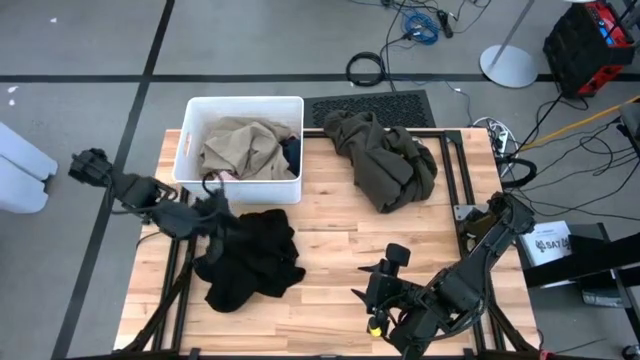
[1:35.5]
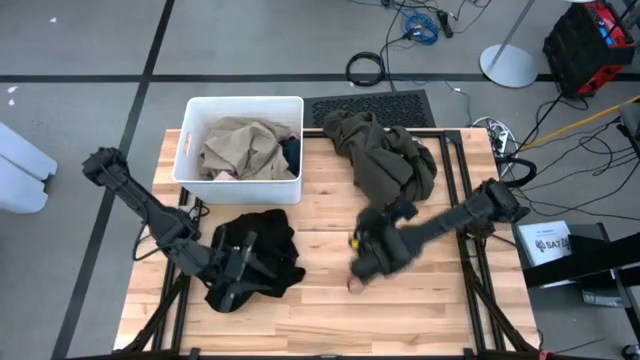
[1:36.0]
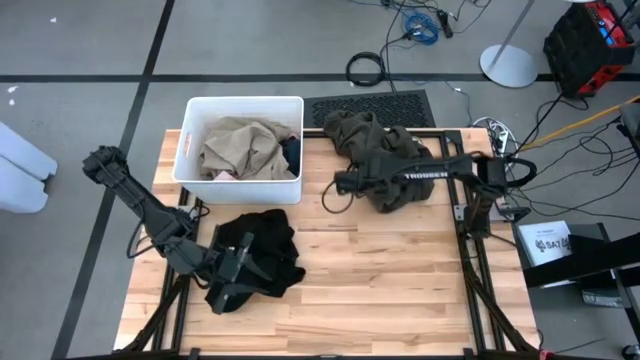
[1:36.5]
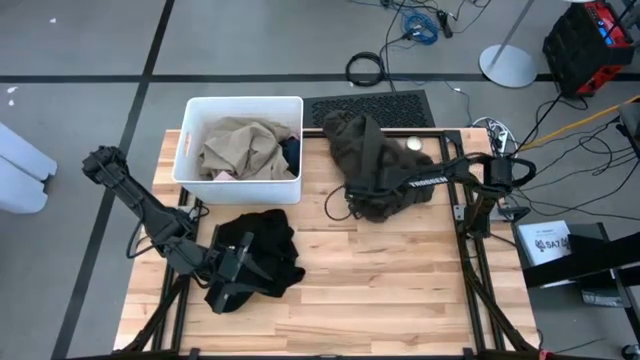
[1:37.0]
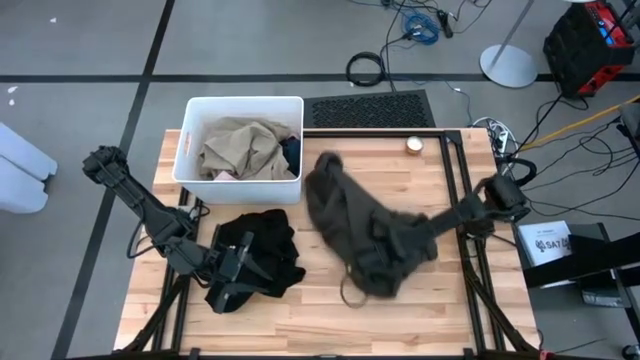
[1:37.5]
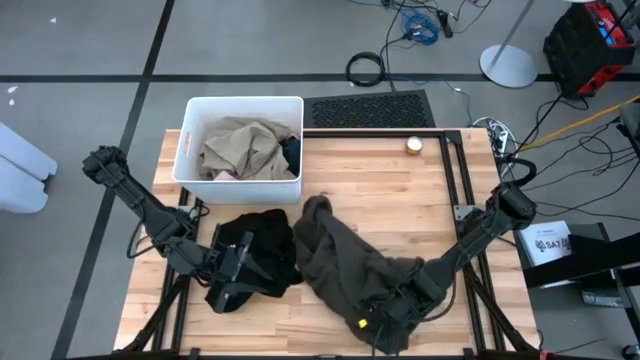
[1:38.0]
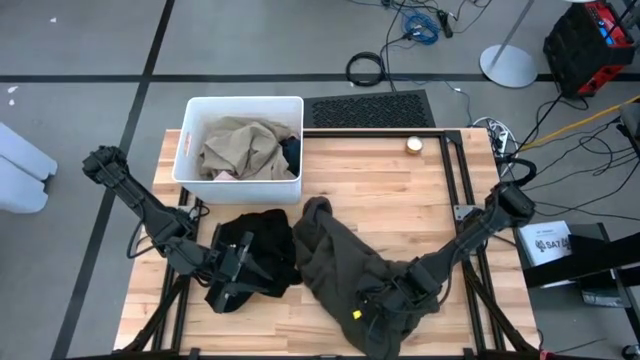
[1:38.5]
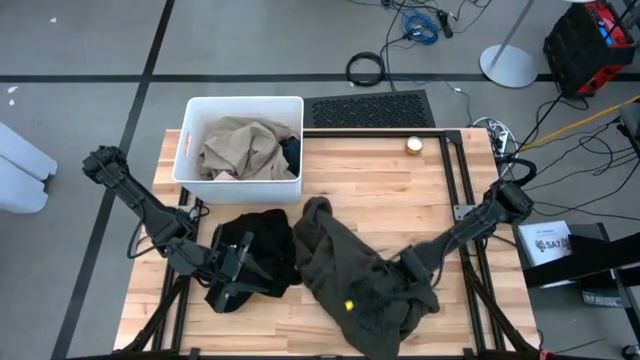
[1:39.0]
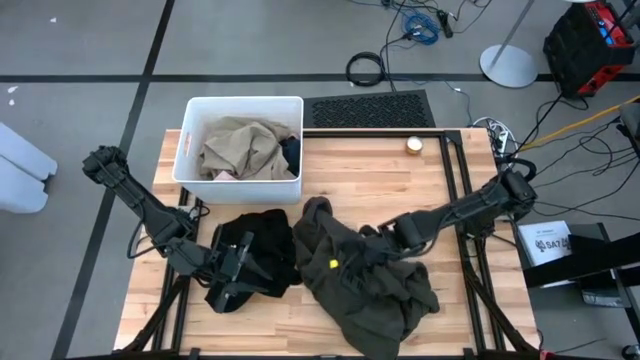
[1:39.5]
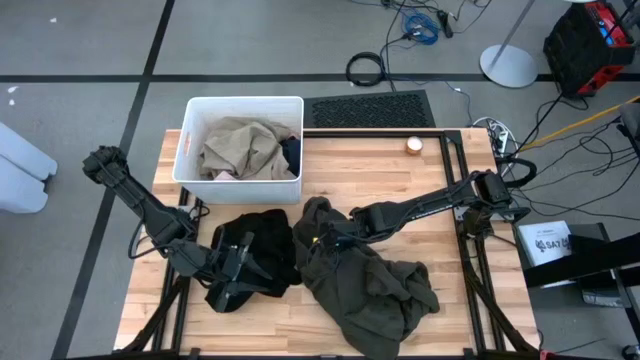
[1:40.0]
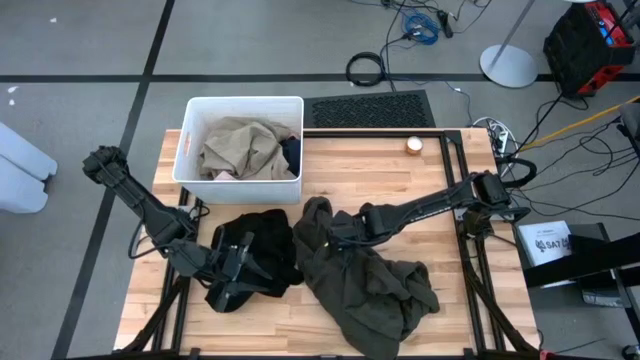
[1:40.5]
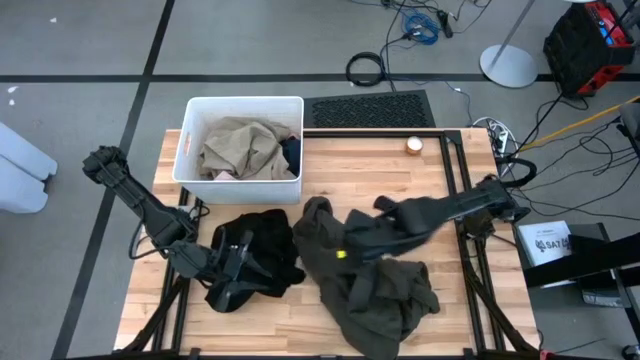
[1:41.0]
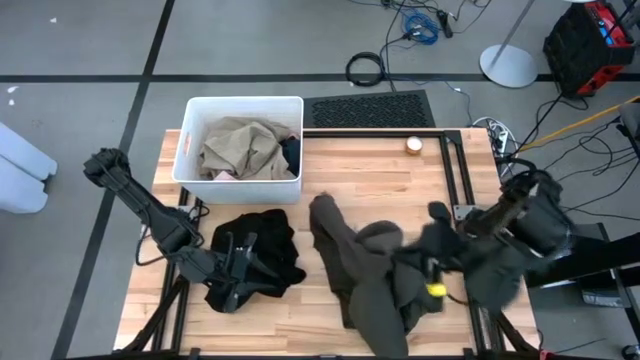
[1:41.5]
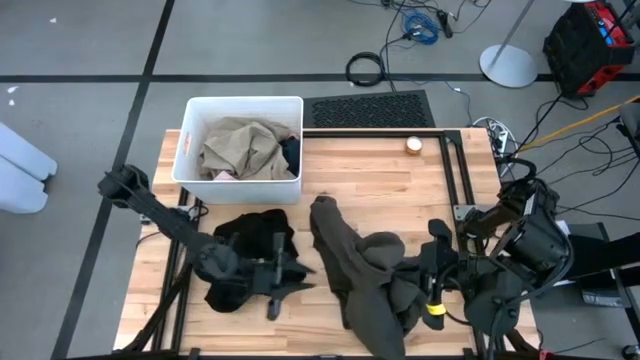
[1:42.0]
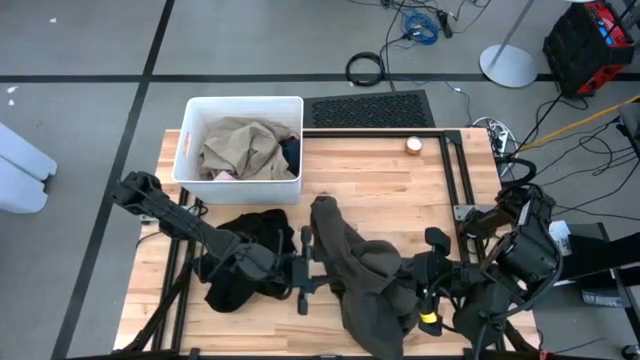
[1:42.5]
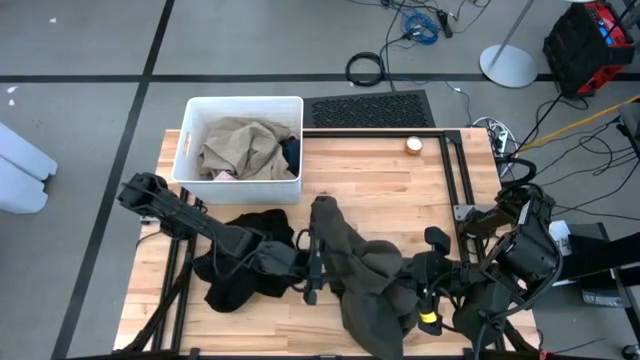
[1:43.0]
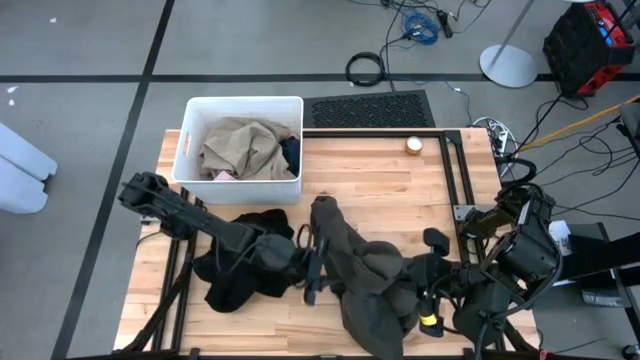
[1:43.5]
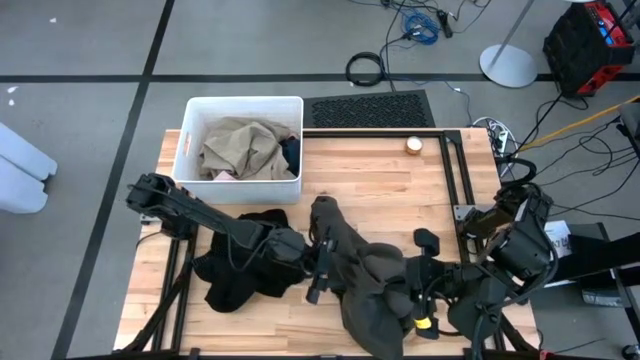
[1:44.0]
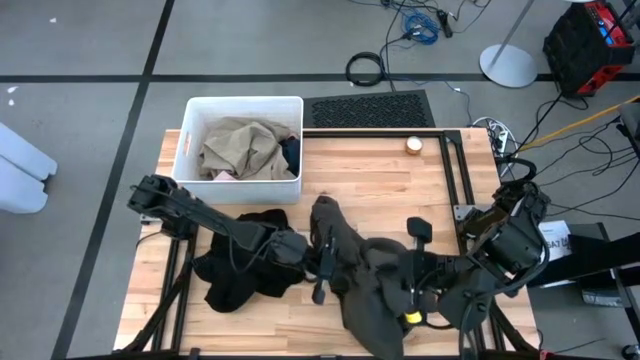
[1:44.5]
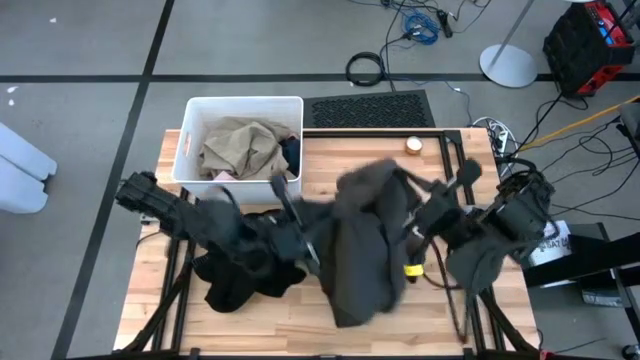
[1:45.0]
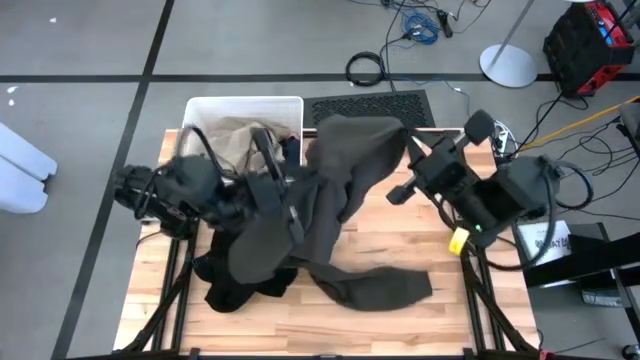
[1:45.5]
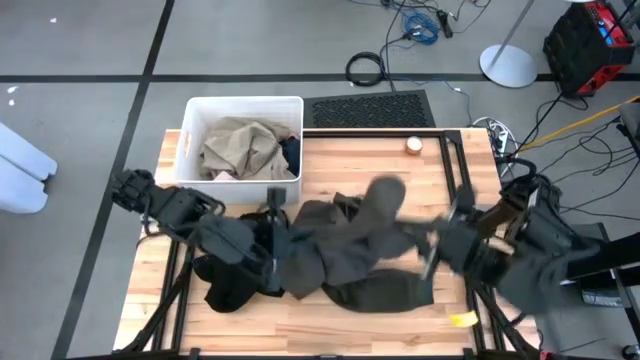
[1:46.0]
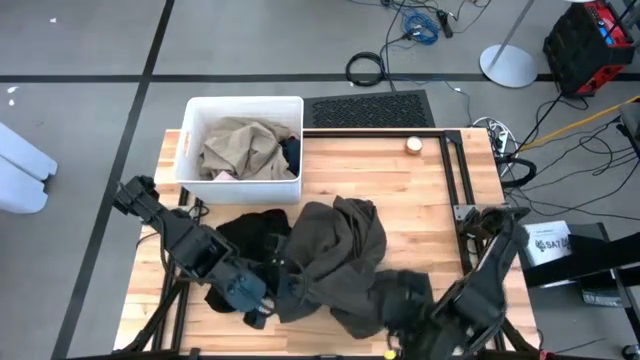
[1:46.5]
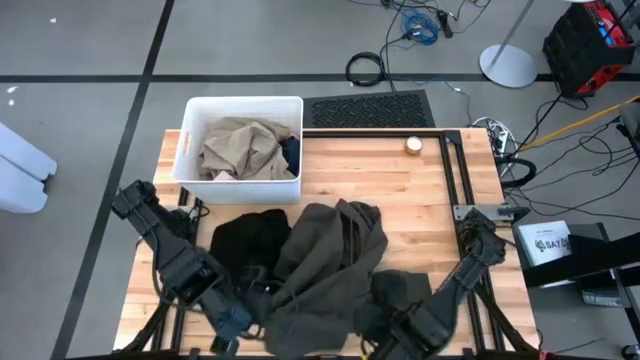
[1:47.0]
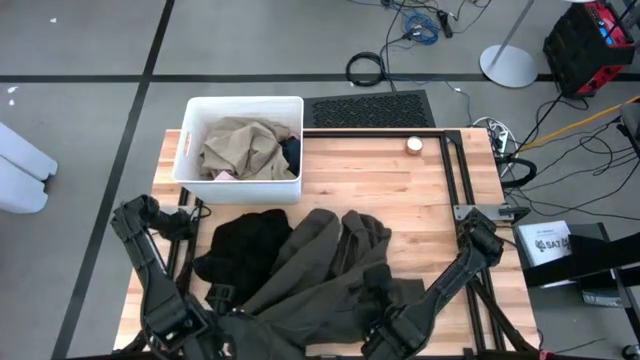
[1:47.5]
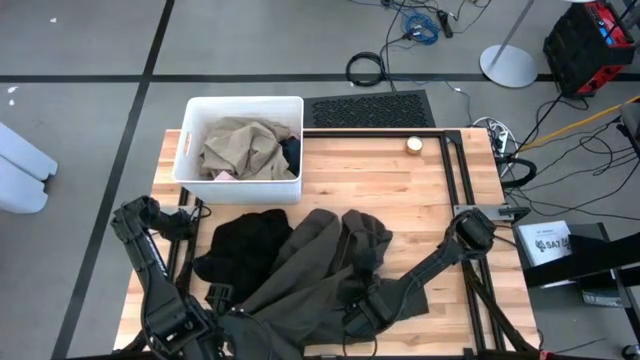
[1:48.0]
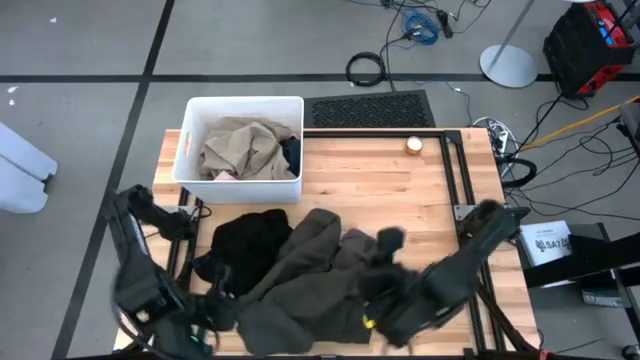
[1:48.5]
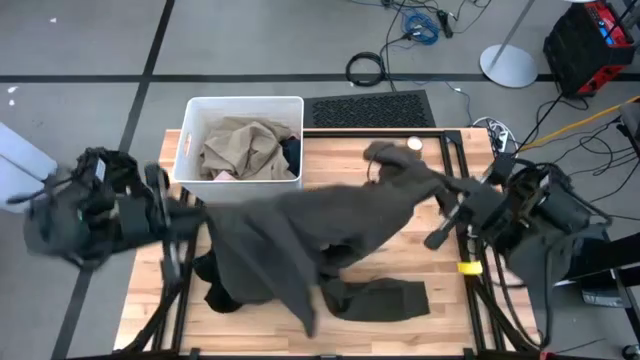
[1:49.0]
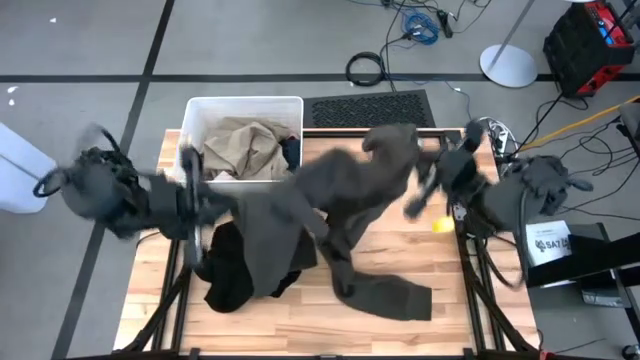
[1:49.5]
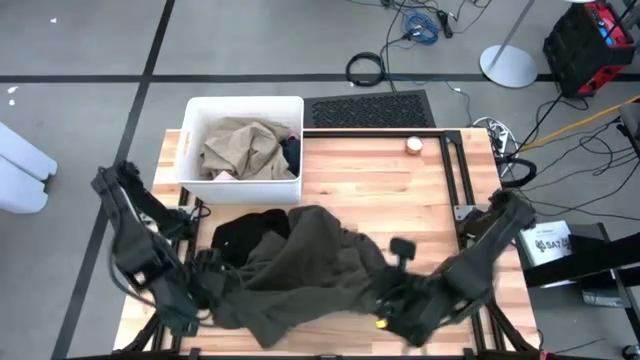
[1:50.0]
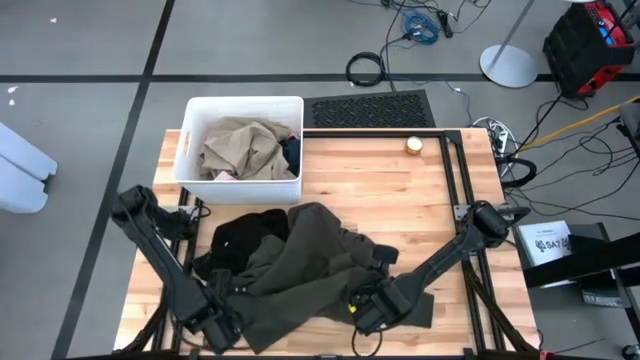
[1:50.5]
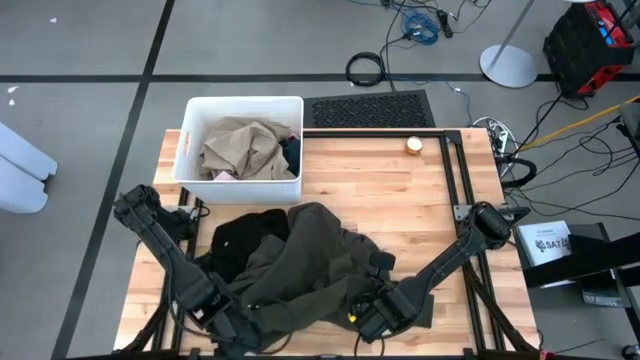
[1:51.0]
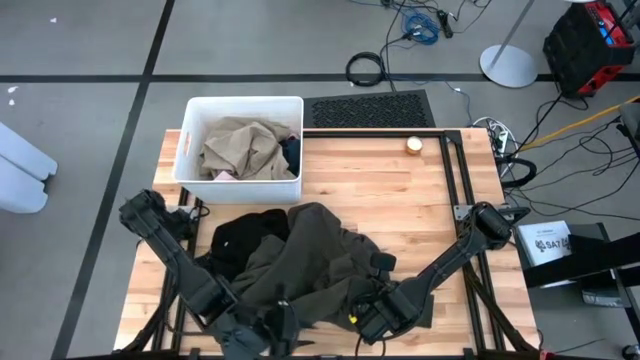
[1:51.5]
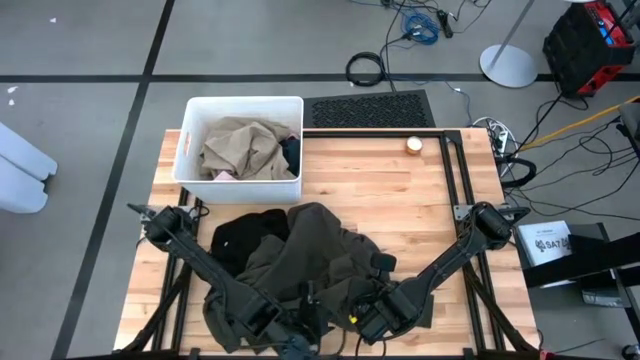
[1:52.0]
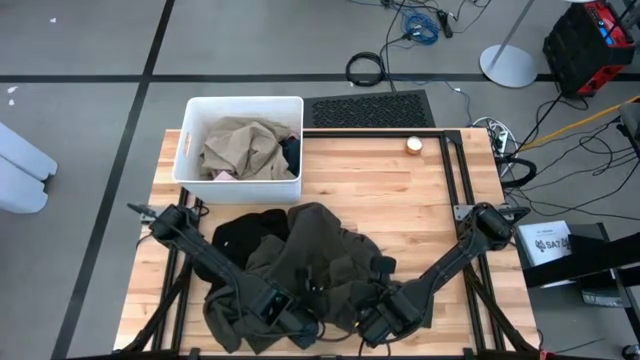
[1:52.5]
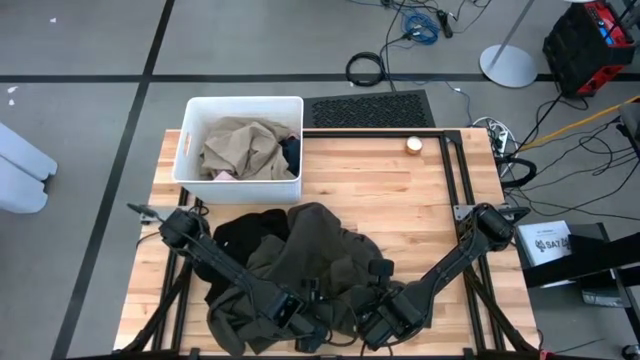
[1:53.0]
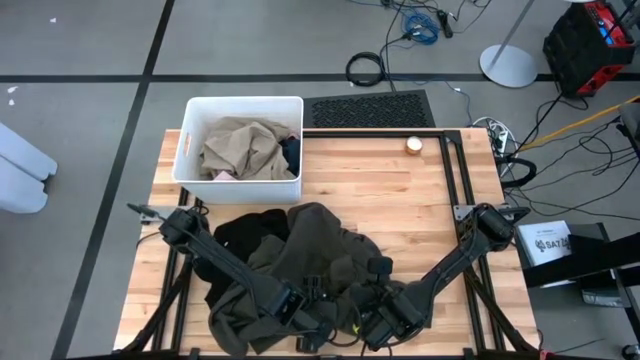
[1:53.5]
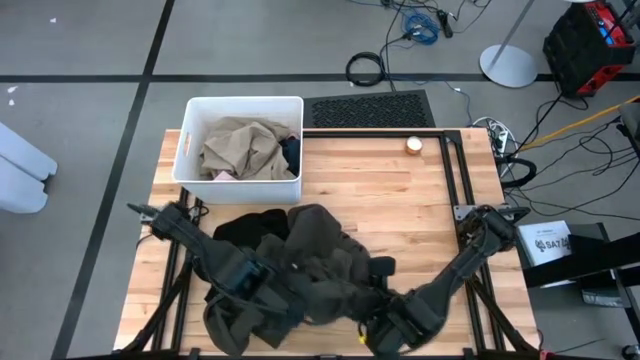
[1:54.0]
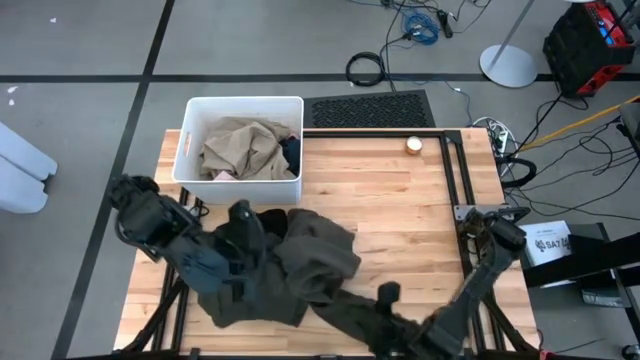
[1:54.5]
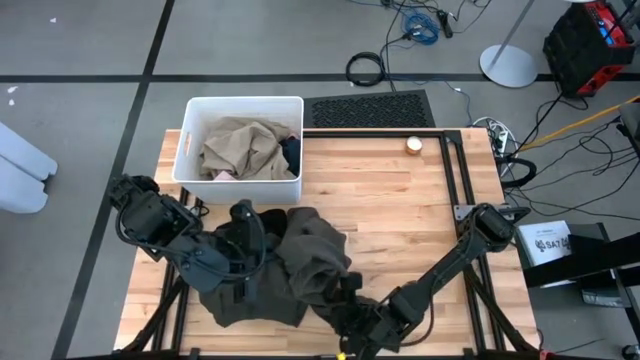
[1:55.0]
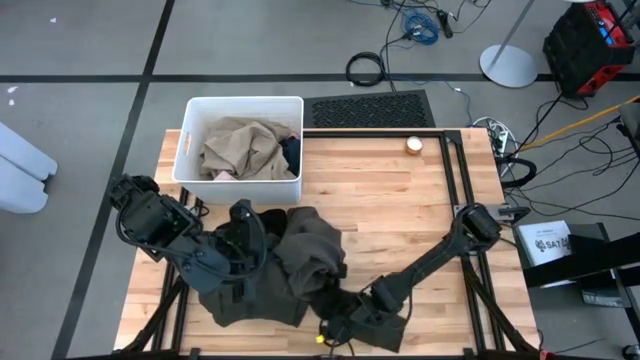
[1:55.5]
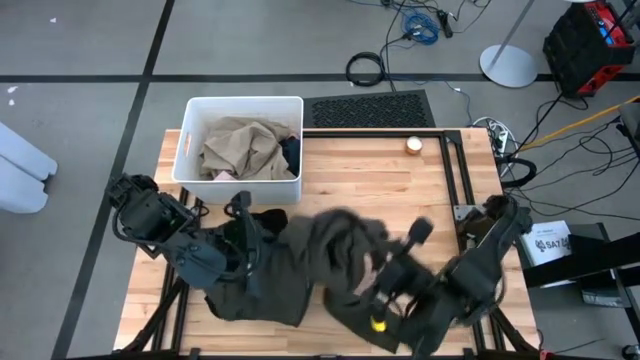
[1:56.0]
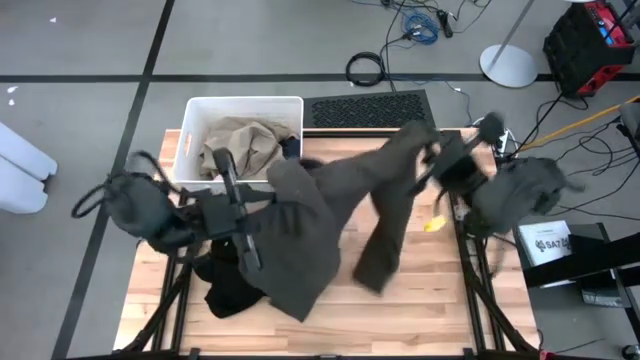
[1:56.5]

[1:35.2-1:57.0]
Task: Sort clothes
Put the dark gray jacket into the white laundry bin
